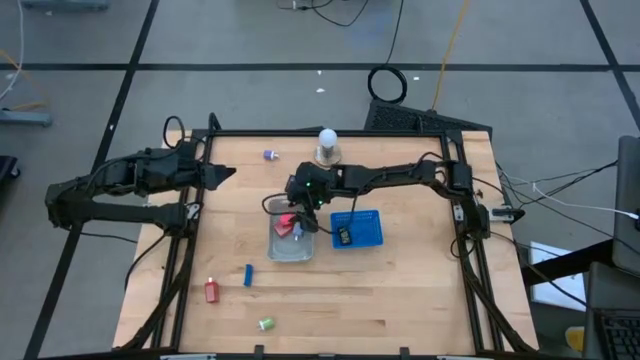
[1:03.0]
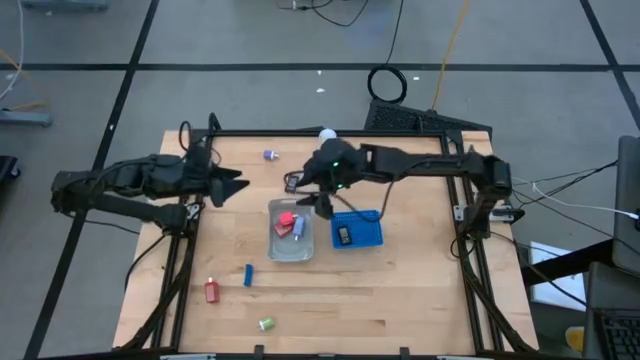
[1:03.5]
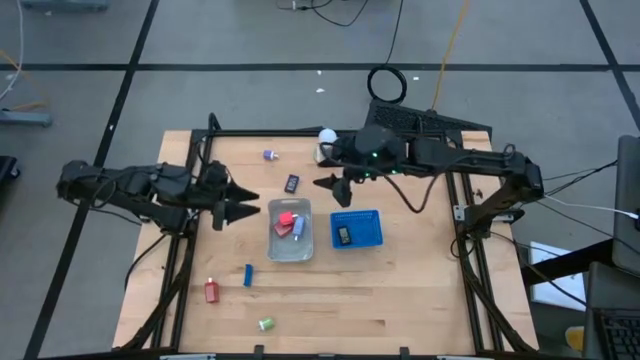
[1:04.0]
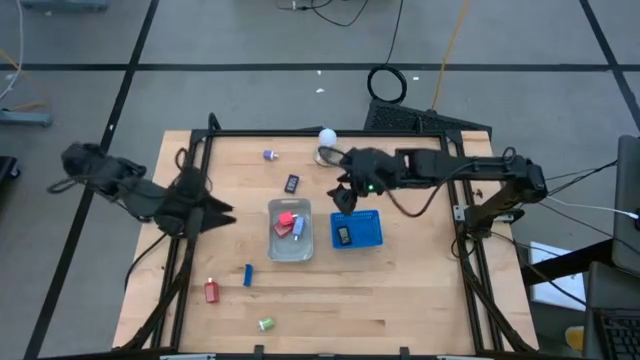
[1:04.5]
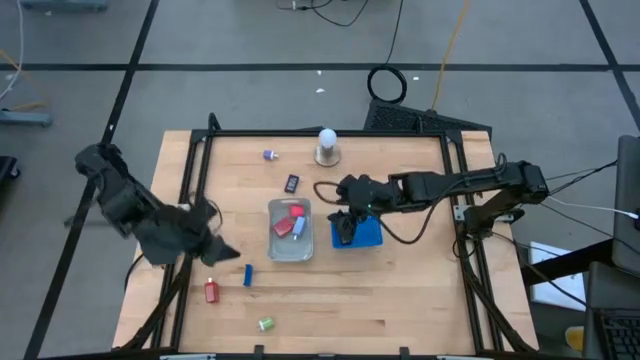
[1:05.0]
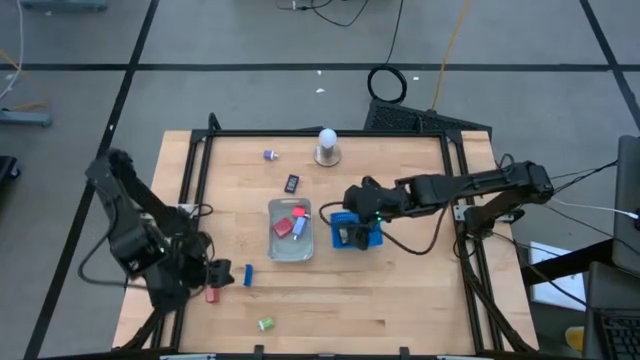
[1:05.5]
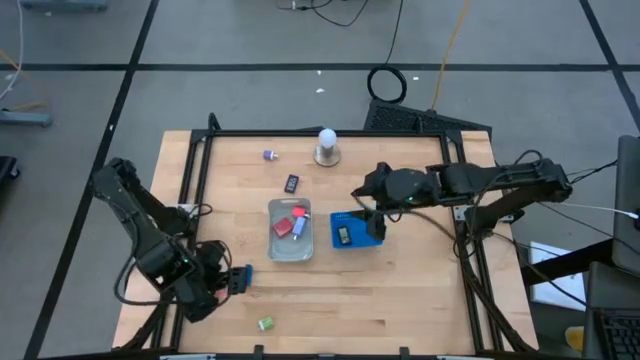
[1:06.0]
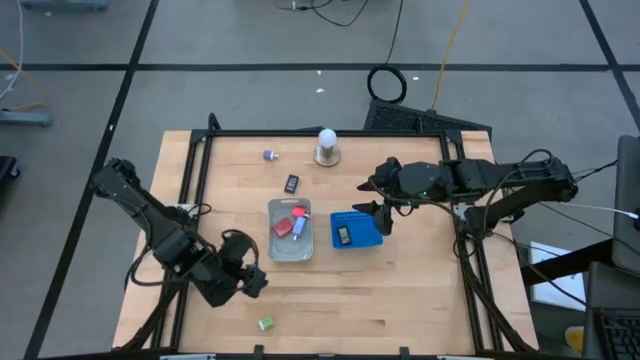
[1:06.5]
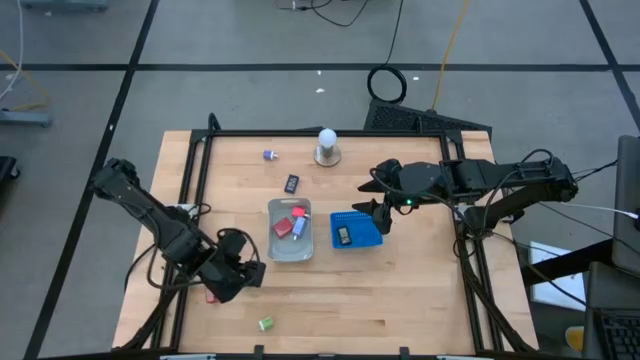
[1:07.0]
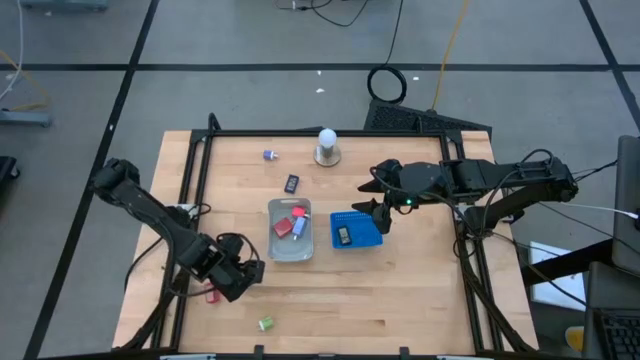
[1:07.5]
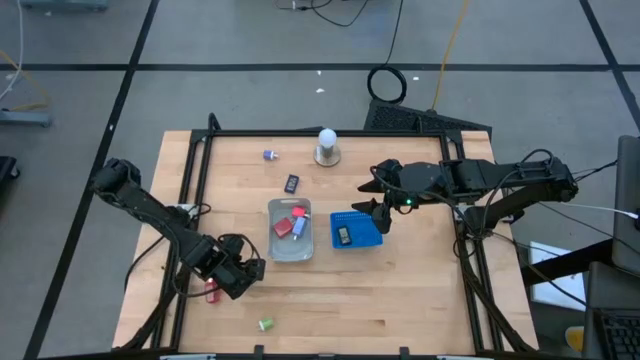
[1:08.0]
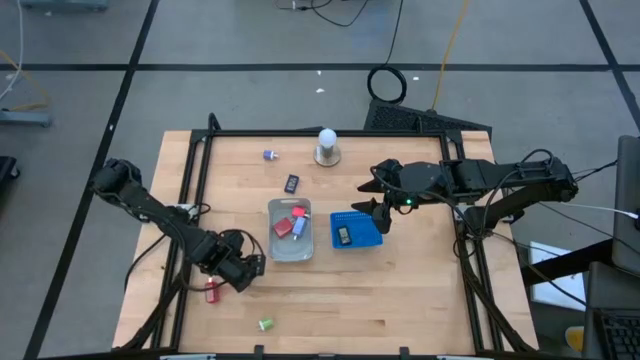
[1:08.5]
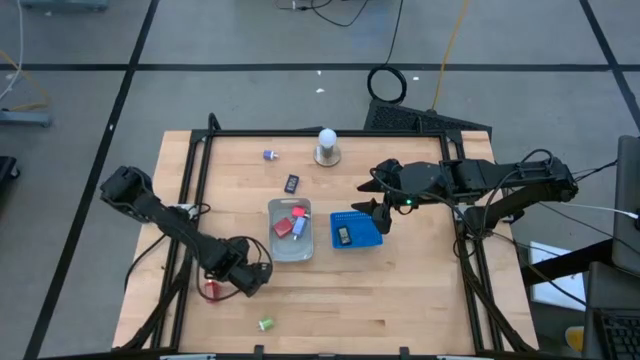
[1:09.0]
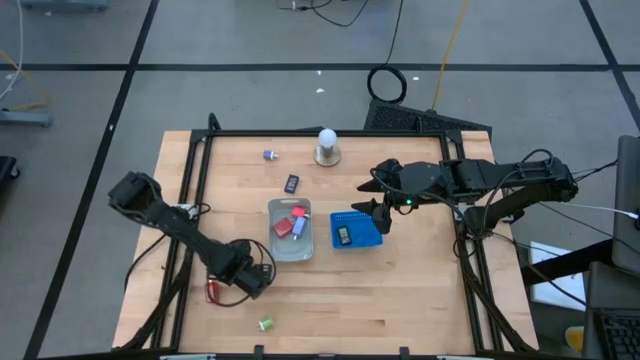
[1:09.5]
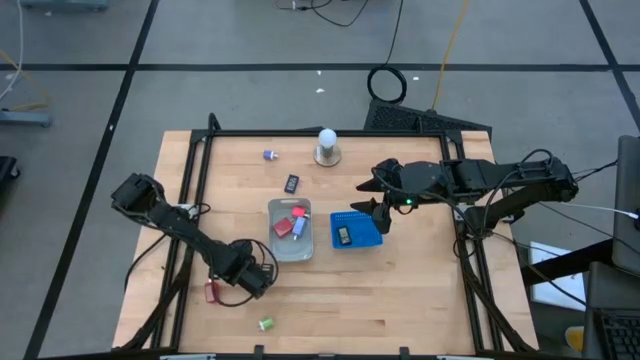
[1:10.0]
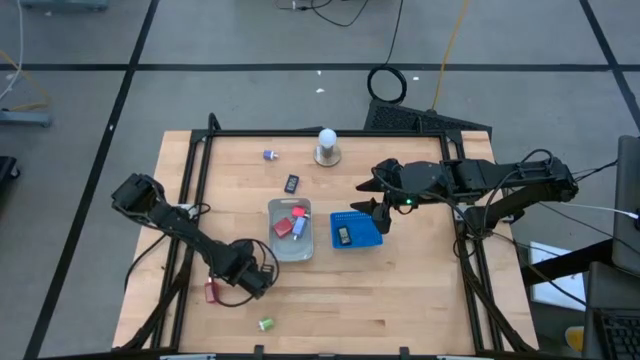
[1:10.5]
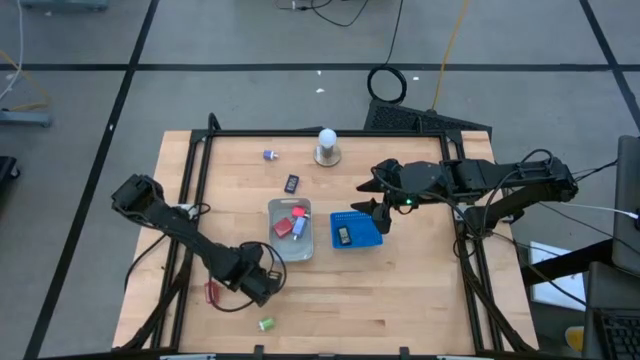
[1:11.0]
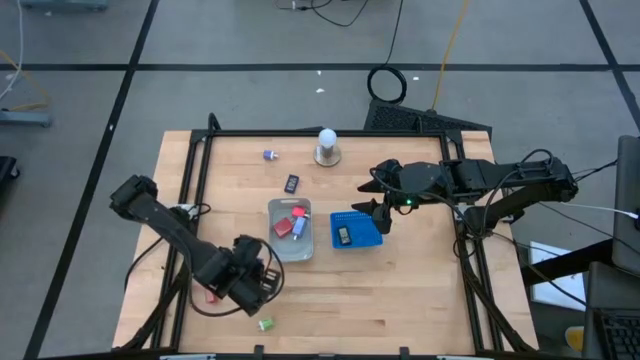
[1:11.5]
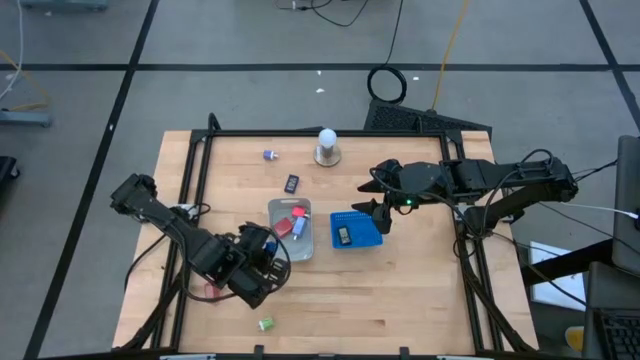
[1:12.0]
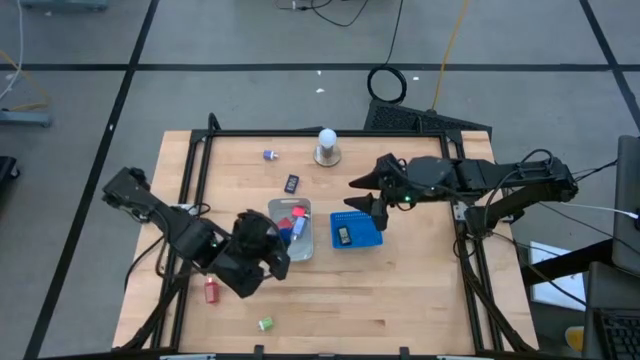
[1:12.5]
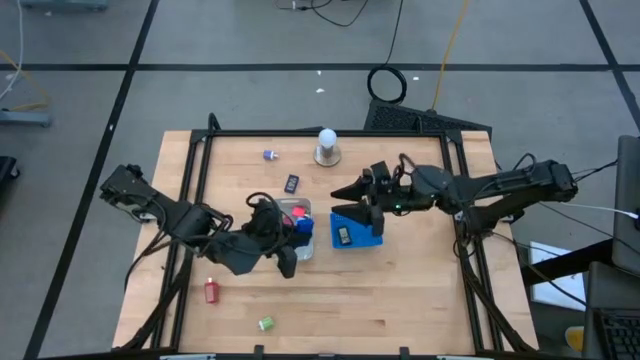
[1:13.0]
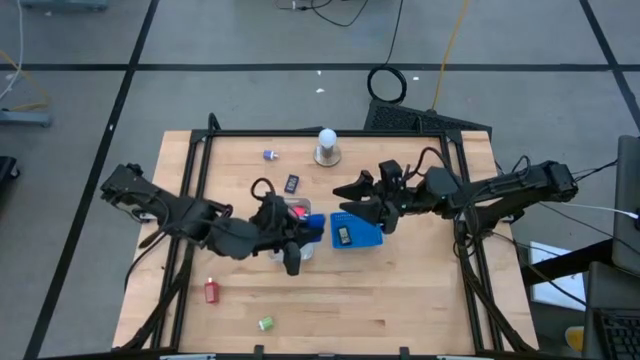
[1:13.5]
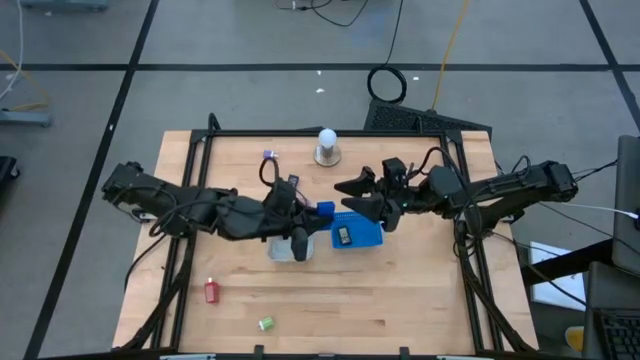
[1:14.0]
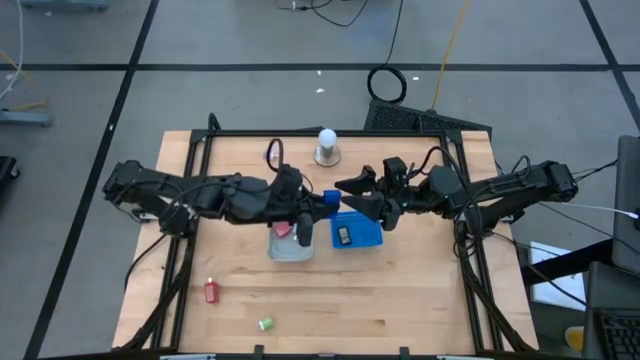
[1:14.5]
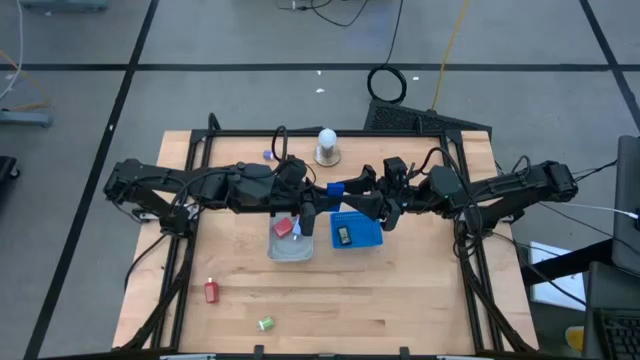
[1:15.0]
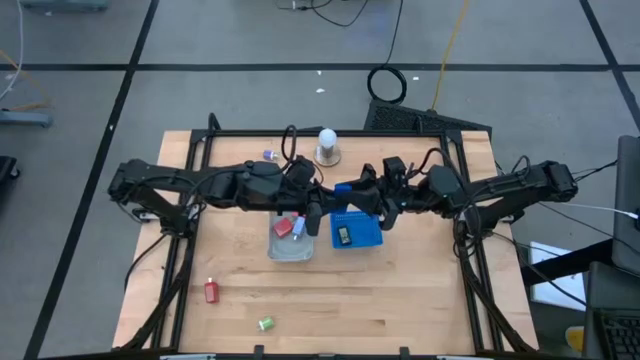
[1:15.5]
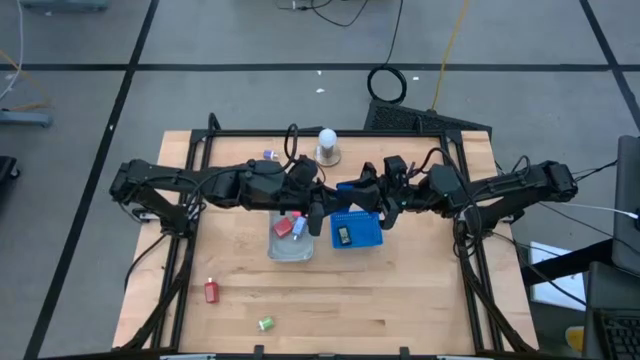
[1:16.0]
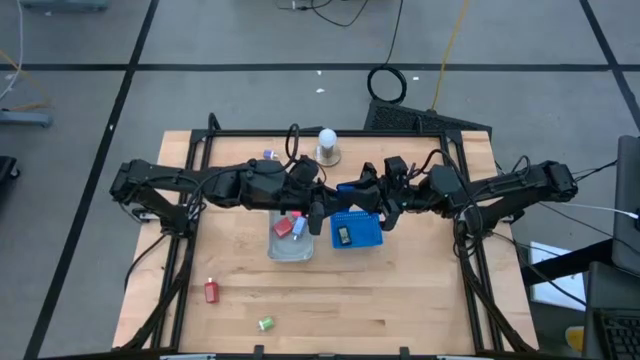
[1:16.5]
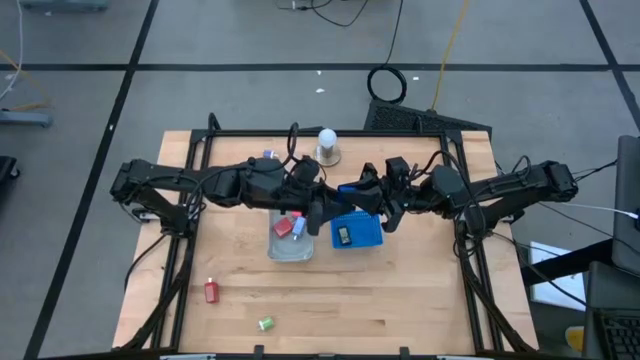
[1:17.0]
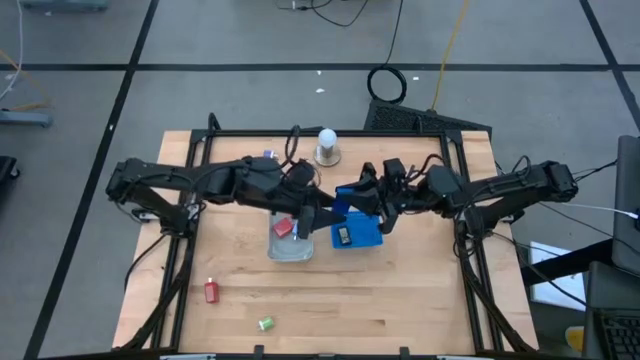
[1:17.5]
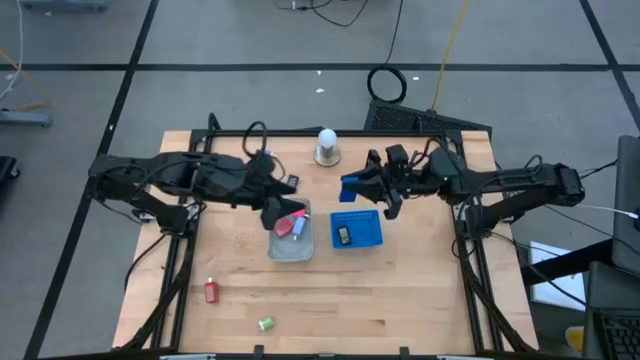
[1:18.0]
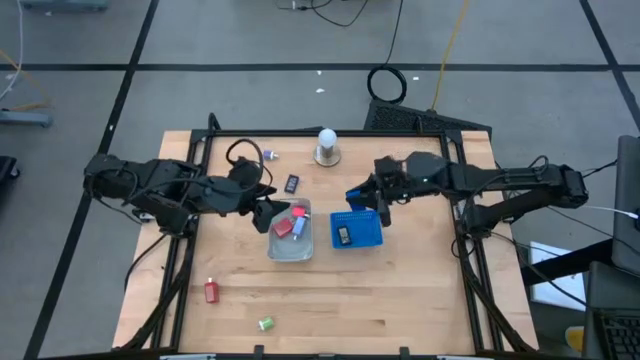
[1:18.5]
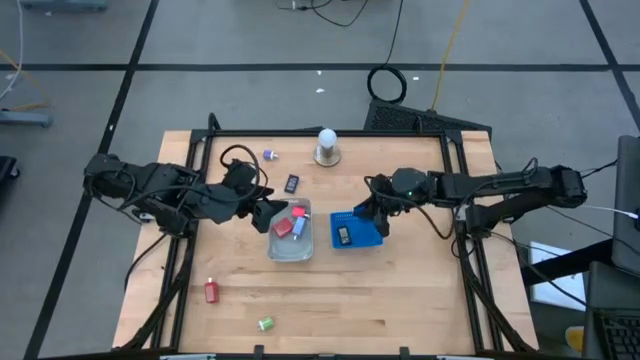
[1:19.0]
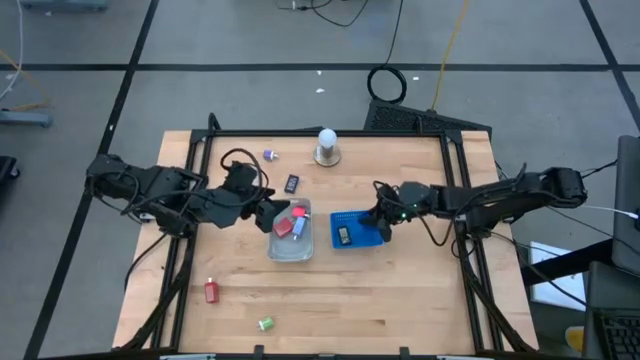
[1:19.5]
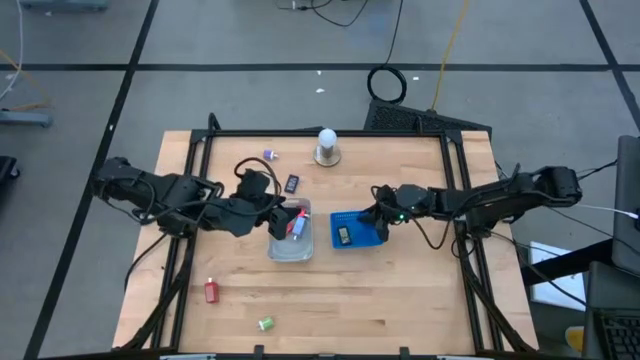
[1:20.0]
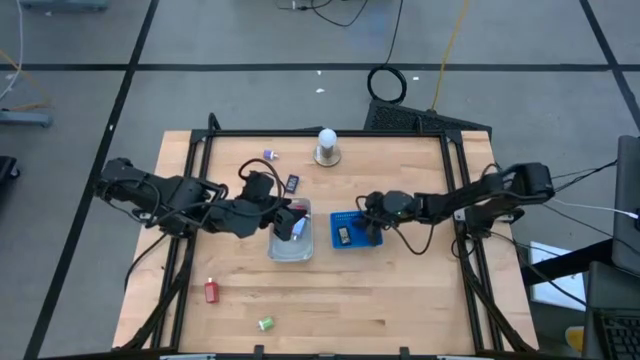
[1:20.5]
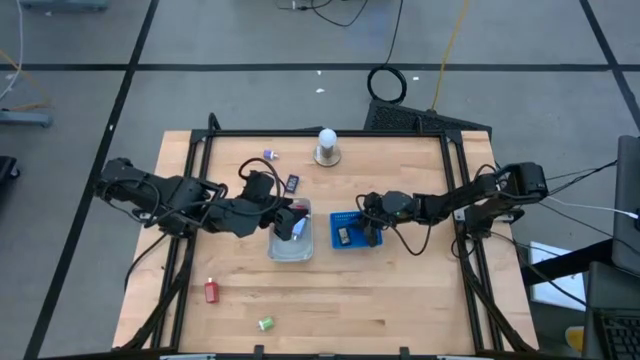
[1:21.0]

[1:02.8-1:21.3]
Task: Pick & Place Office items
Put the bottom blue digital clock into the blue bin

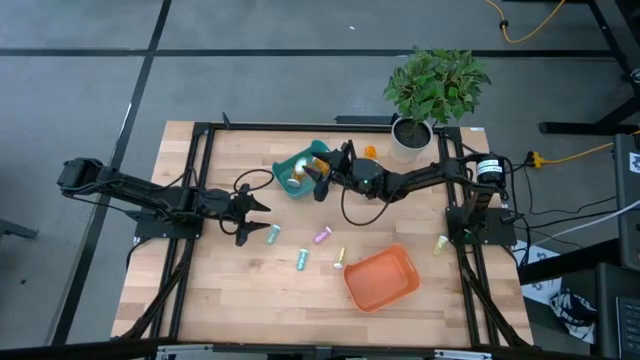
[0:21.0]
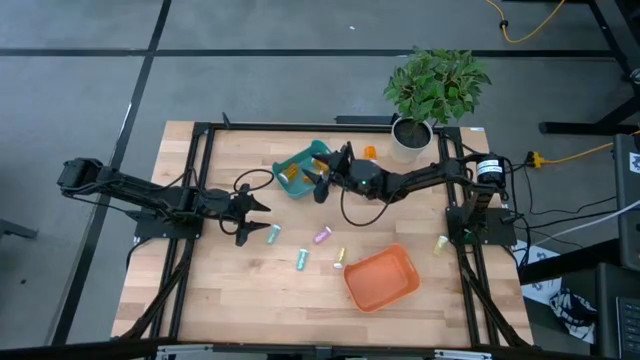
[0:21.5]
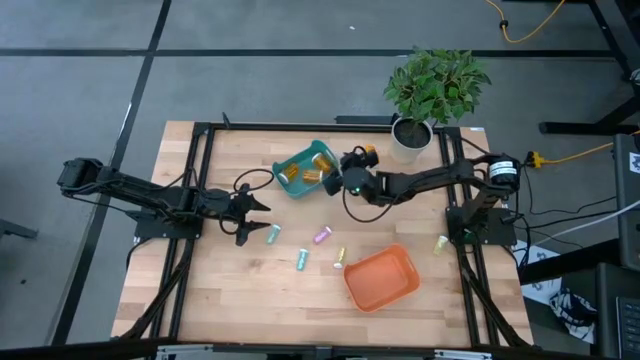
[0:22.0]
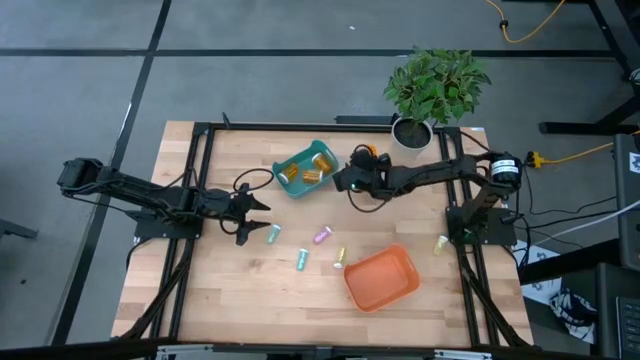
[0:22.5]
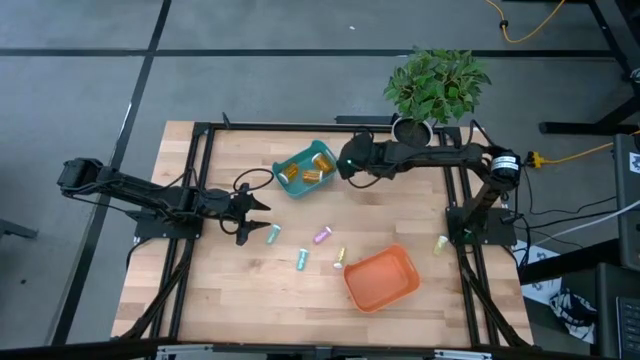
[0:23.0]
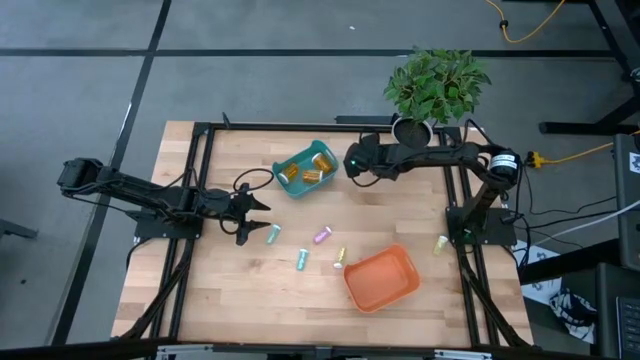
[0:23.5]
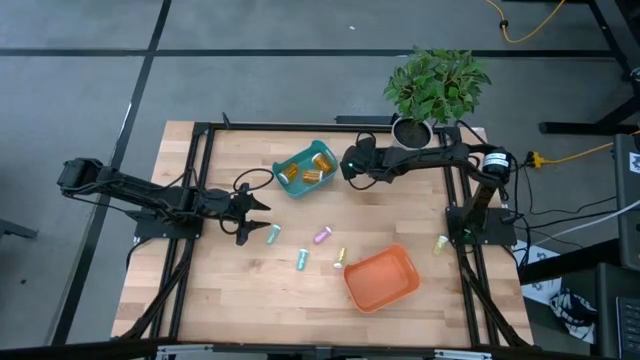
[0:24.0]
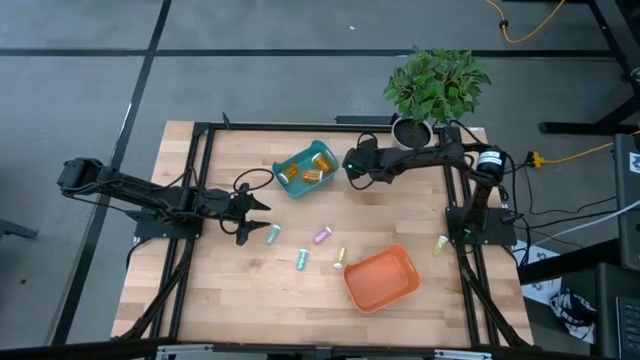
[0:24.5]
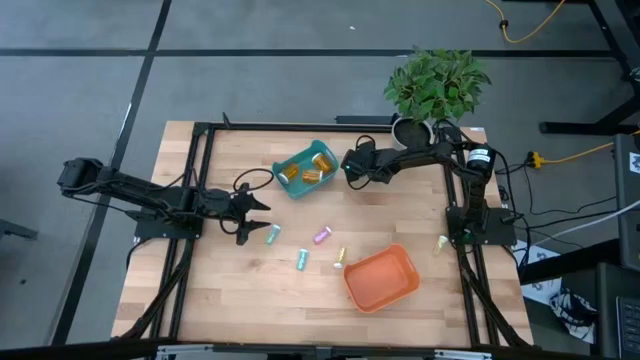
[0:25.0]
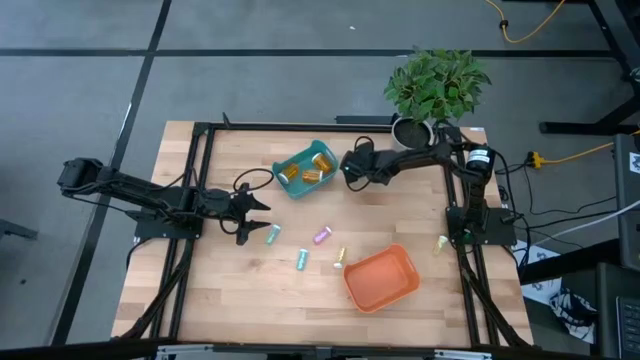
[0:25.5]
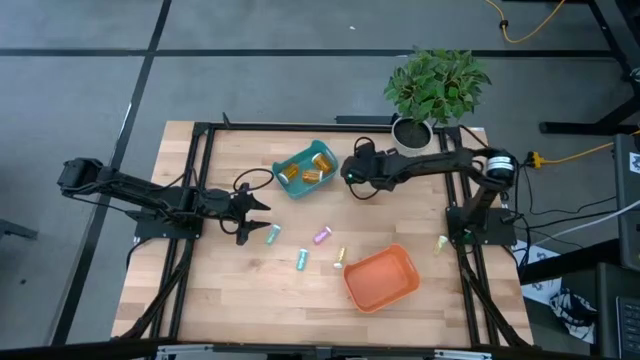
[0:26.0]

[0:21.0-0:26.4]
Task: Pick and place medicine bottles into bin by pill shape (circle, oval)
Put the big orange pill bottle into the light blue bin
